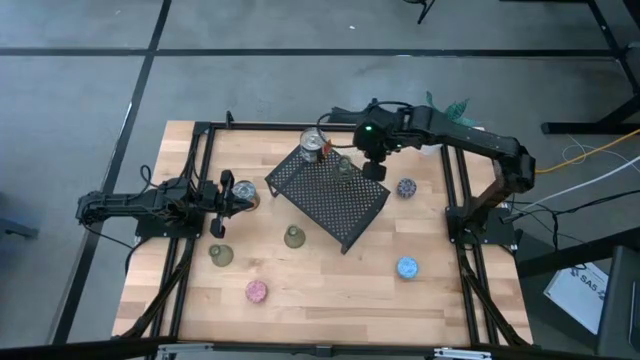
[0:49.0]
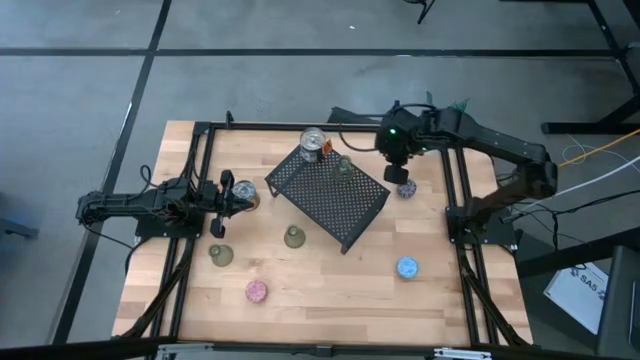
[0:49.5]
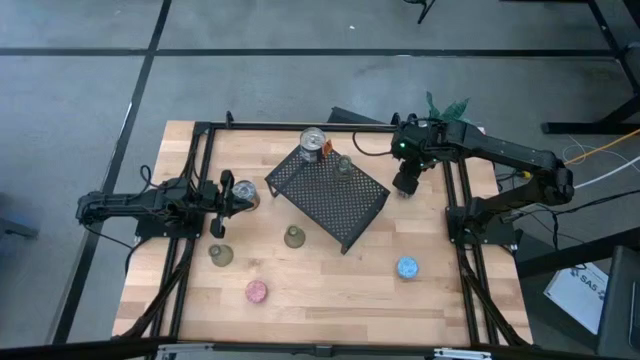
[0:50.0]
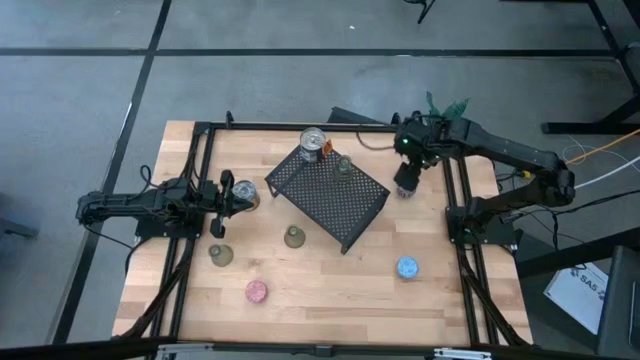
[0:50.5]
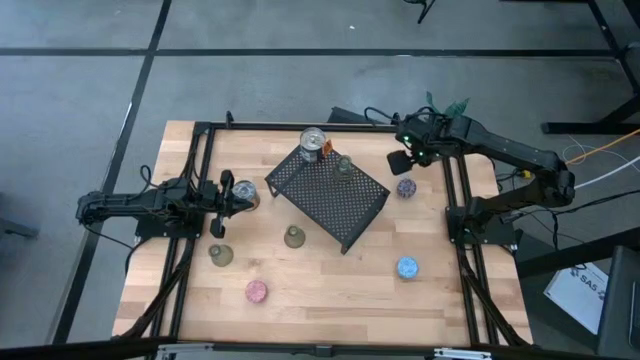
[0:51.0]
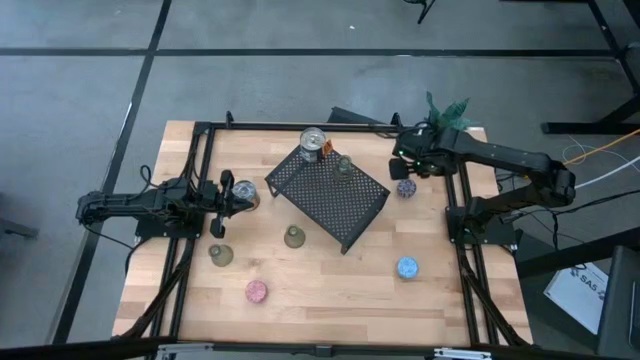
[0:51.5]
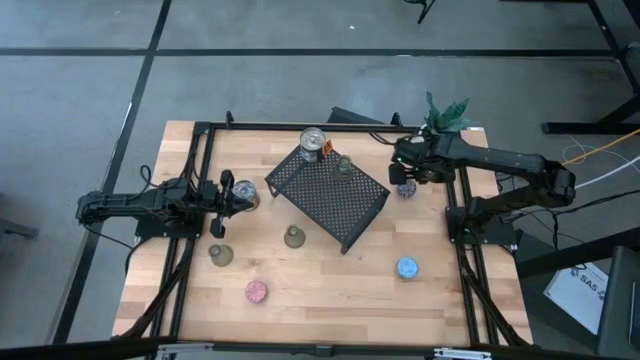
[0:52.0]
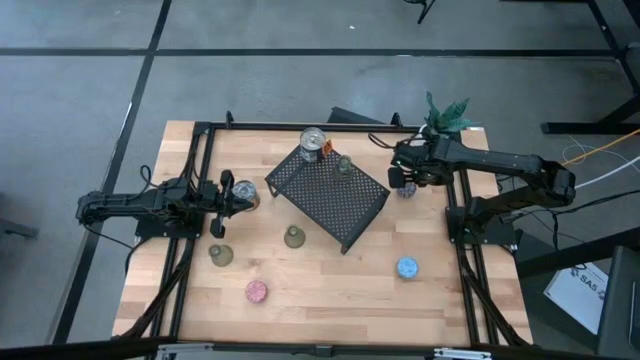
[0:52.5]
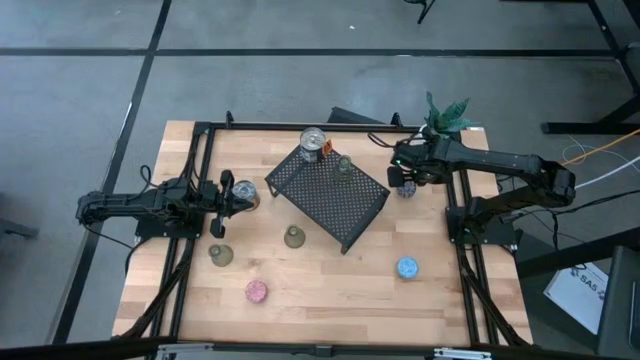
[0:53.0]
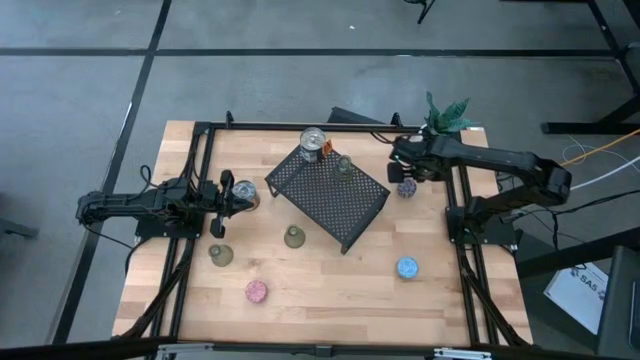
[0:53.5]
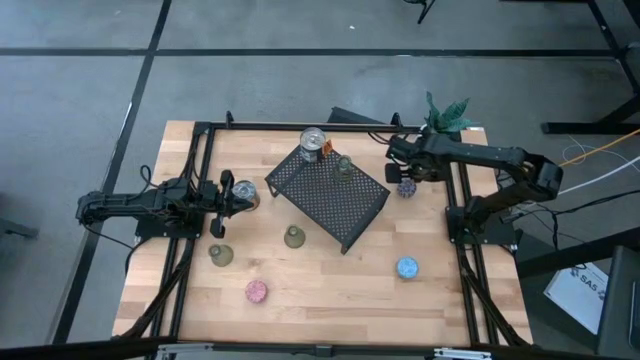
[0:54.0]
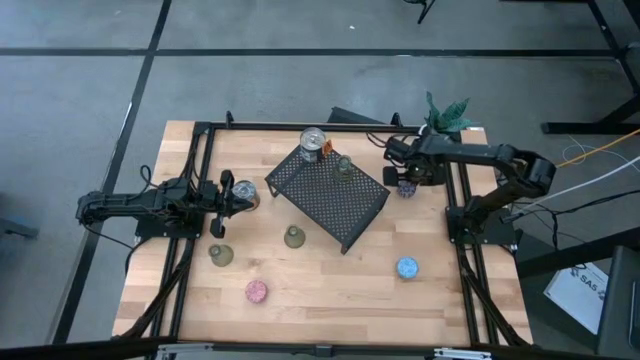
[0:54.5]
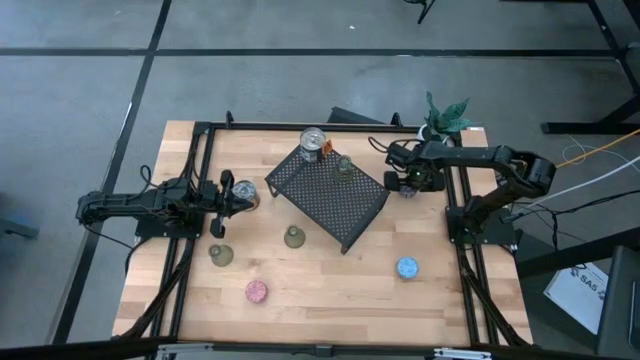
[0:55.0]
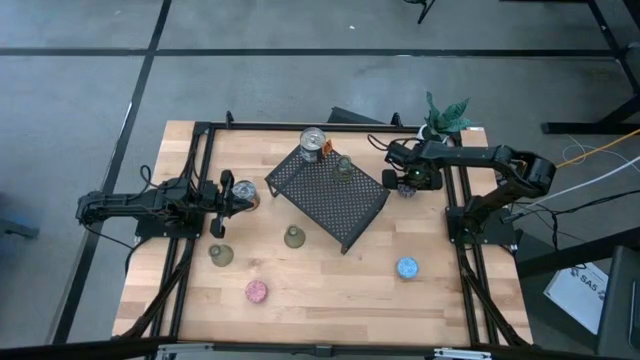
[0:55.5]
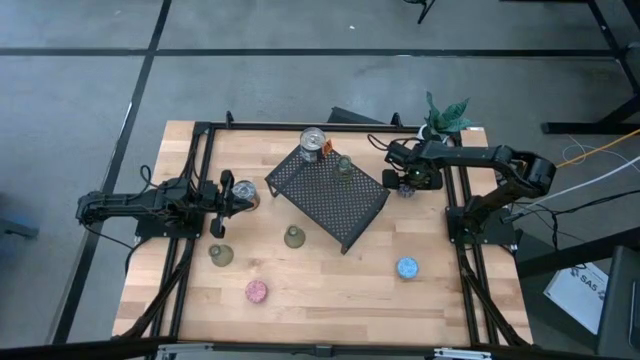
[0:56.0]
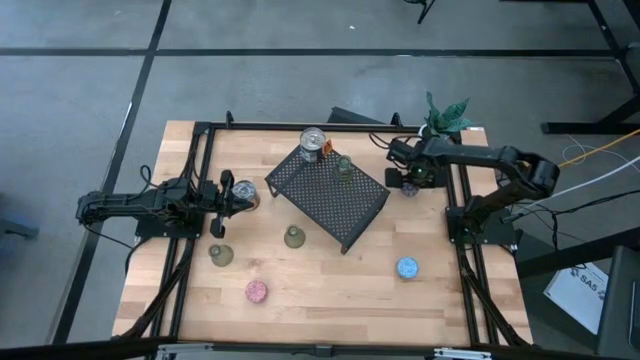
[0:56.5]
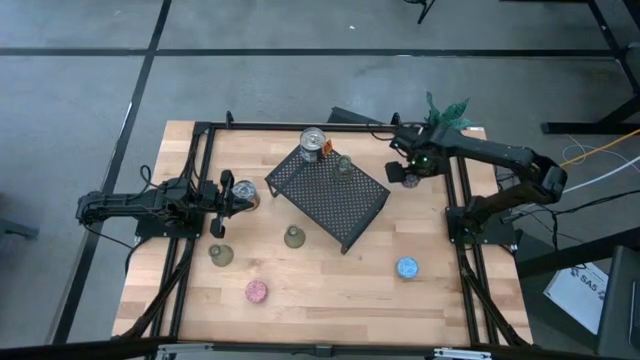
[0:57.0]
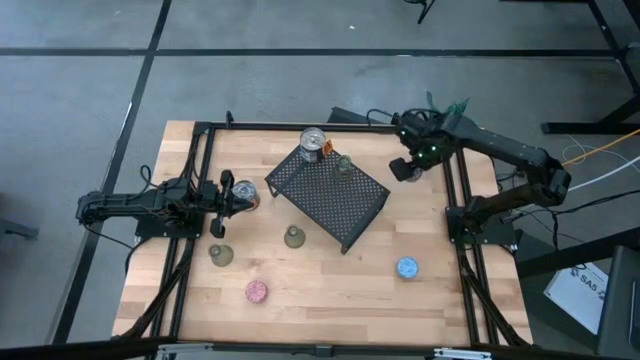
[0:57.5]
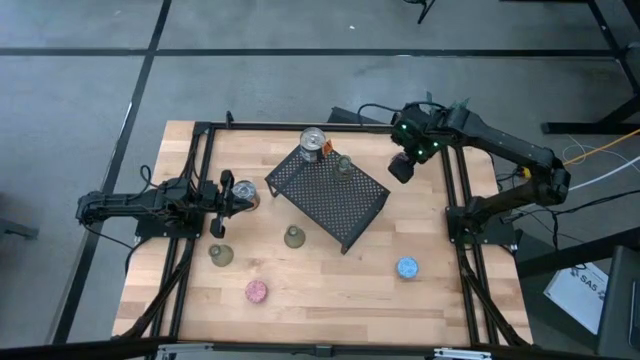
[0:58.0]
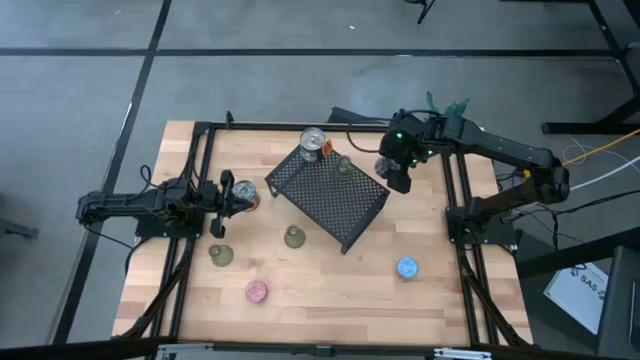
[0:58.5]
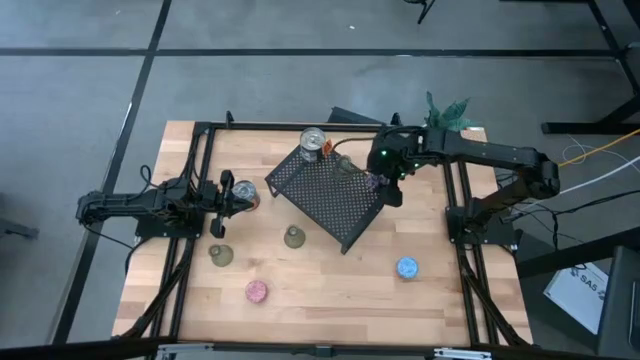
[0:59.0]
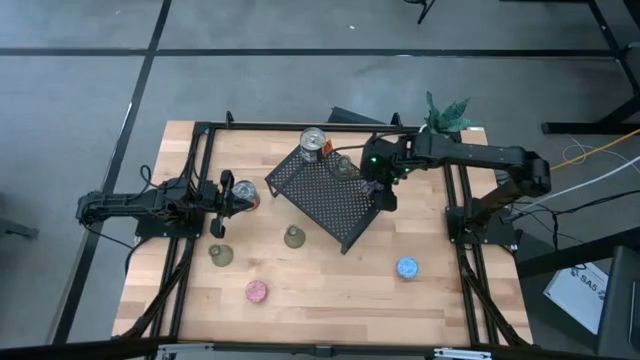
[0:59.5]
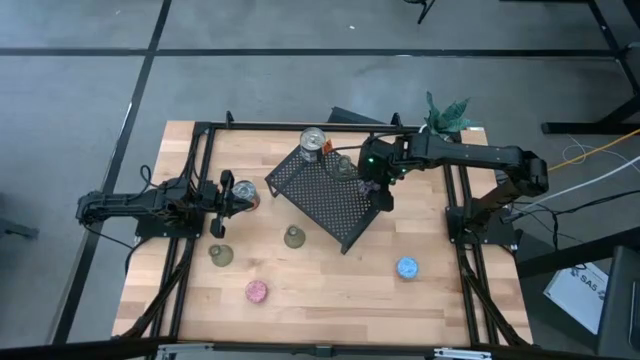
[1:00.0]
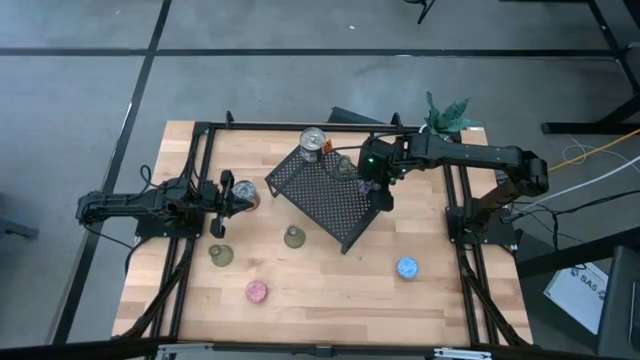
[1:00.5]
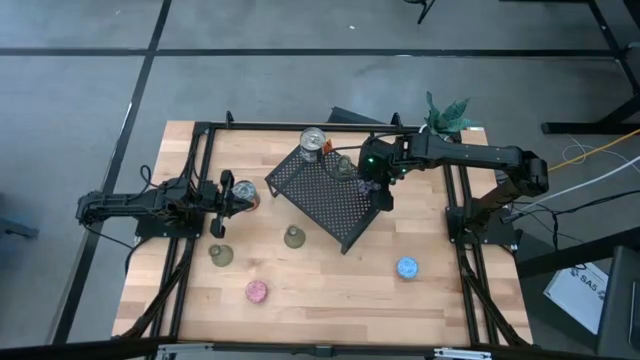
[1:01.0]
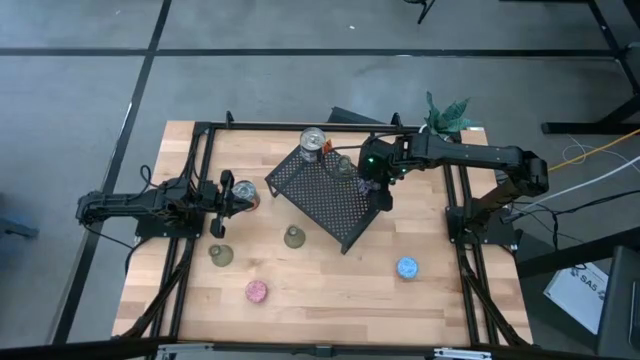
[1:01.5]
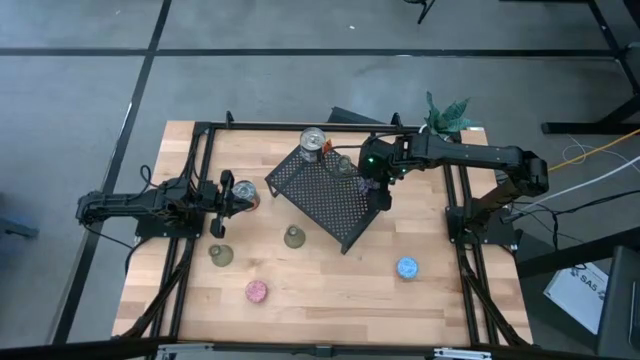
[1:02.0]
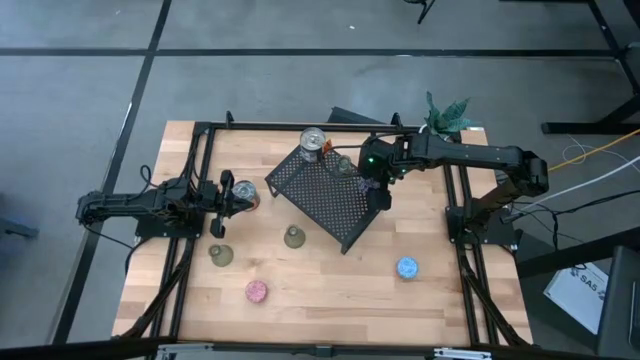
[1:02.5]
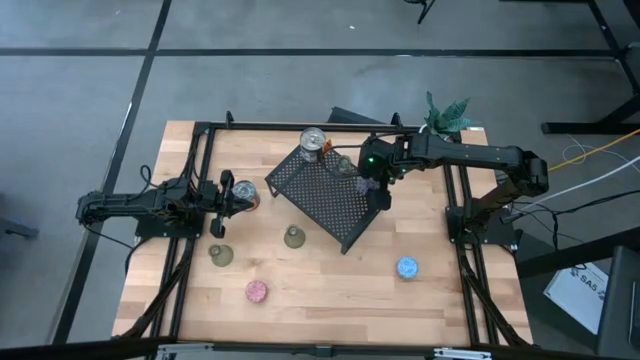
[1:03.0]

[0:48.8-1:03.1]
Task: Pick & Place candle stick holders
Put the dark red scented candle on the shelf
